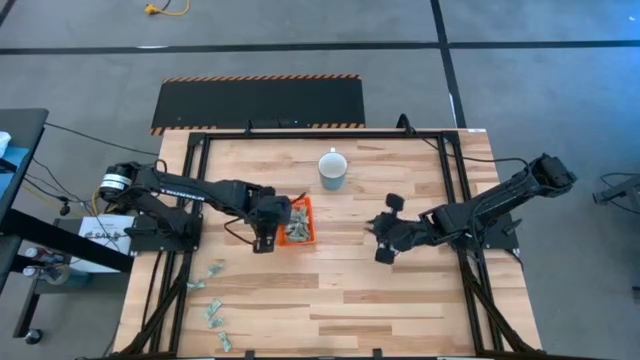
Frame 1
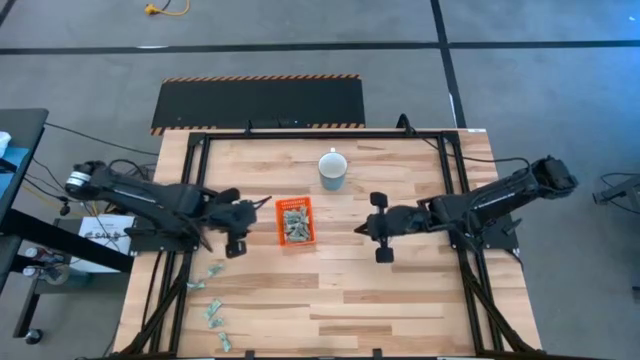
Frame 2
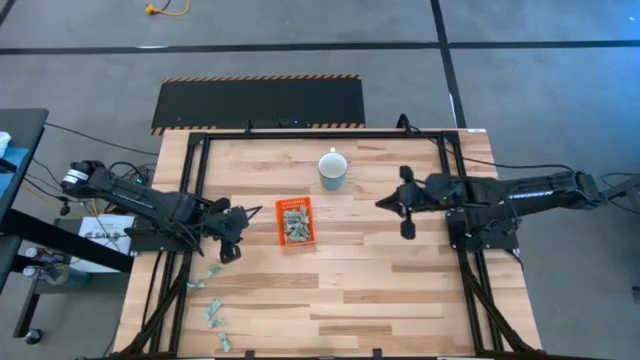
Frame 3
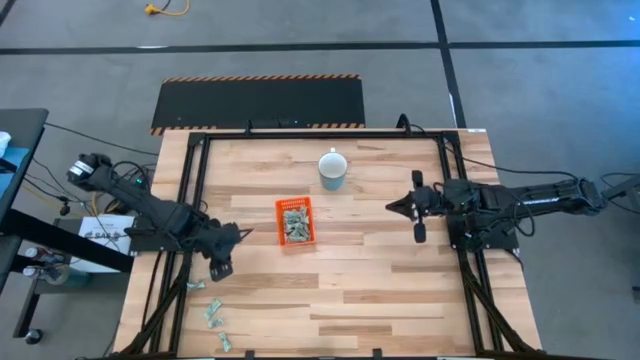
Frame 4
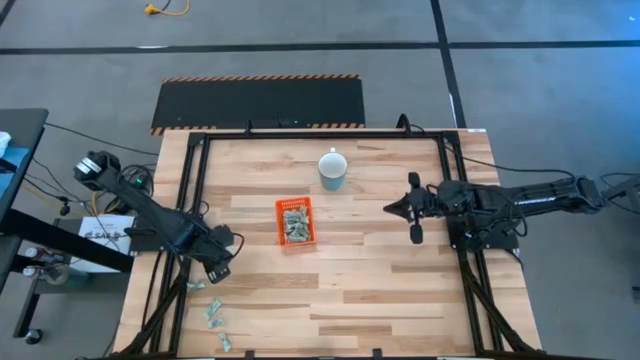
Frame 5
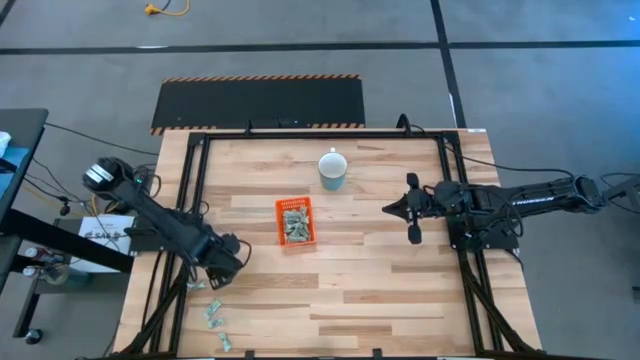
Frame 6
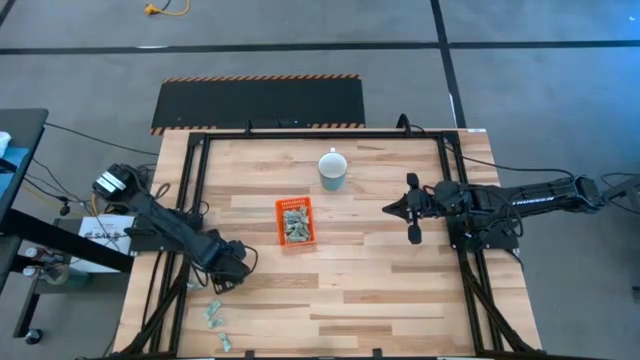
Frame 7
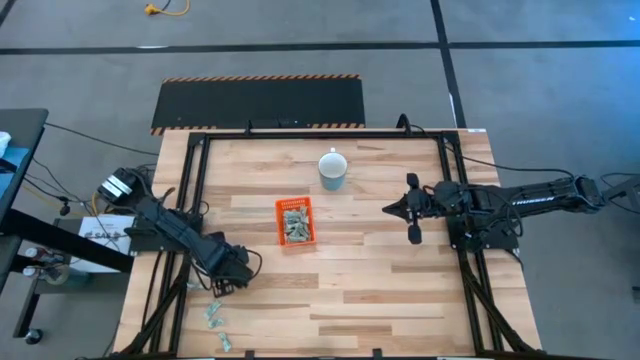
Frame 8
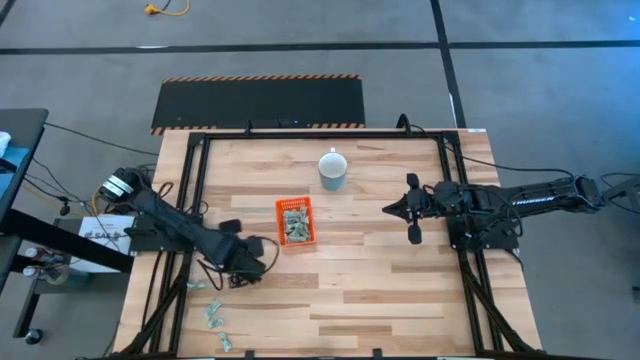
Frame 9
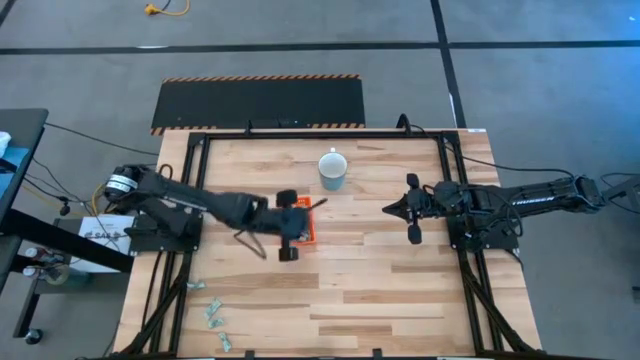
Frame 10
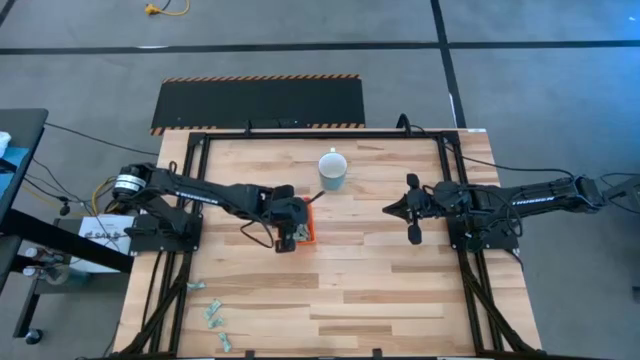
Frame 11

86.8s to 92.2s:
Task: Pick and place items into bin
Put the green stevia packet into the orange bin

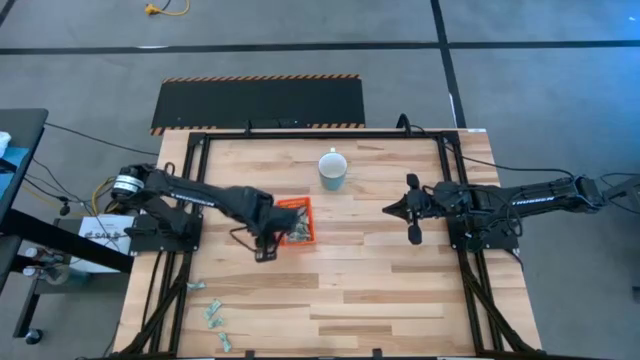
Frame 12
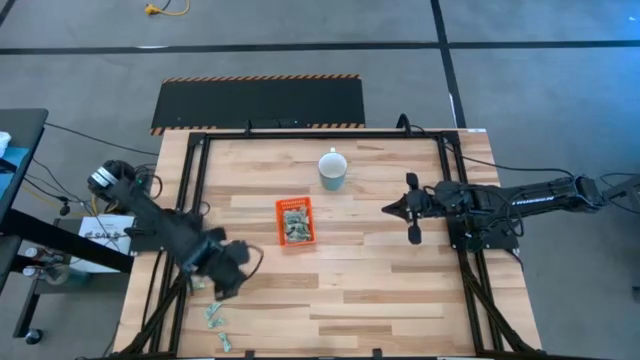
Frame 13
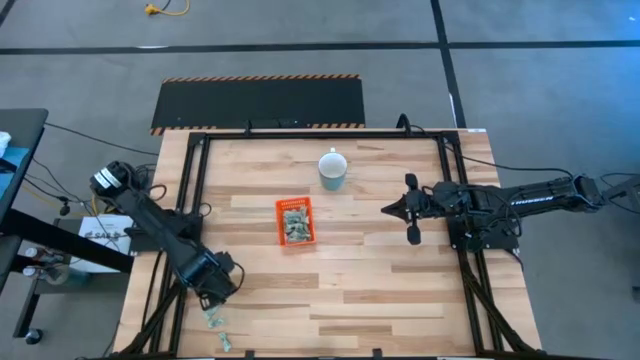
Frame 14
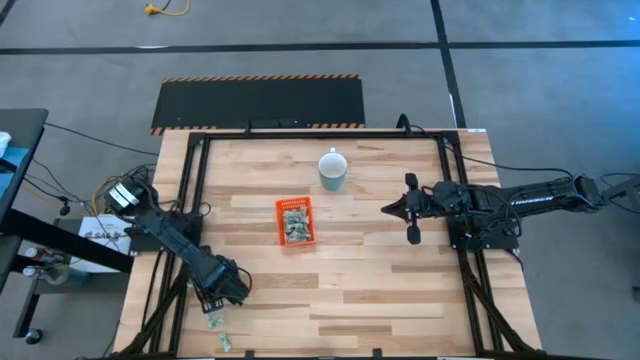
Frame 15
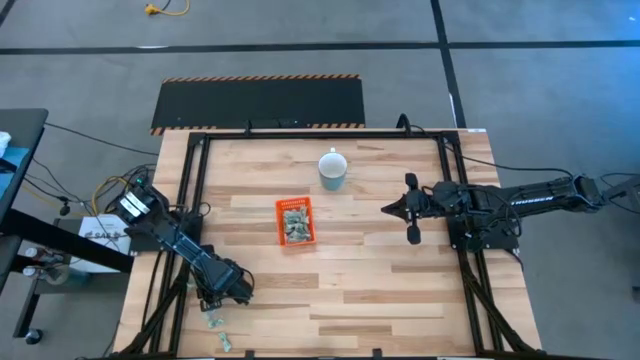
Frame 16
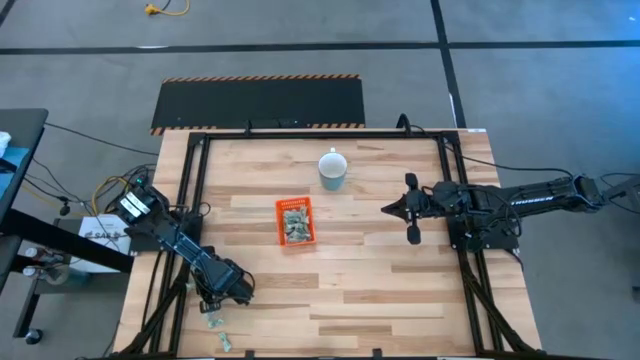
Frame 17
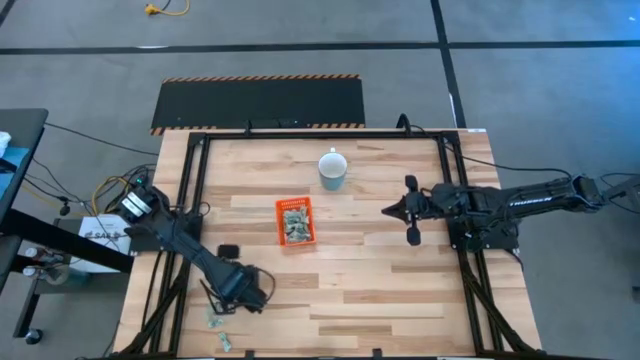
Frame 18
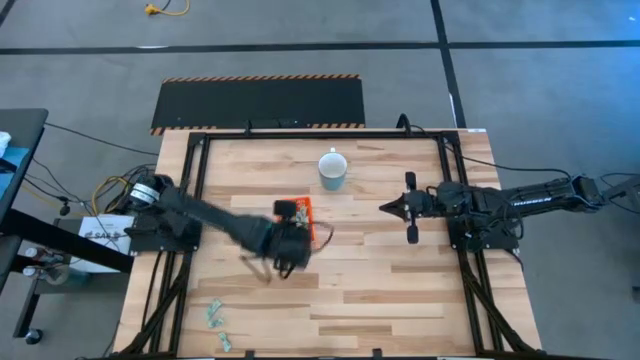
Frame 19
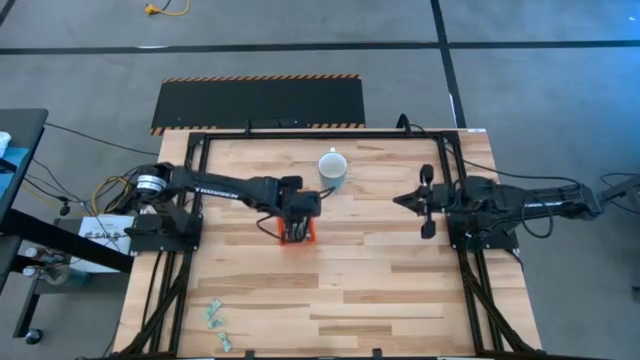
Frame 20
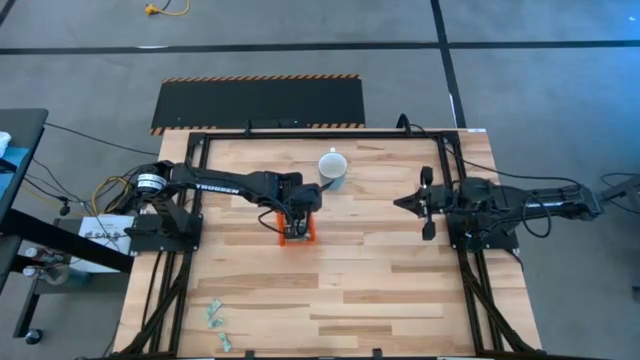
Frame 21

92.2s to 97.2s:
Put the green stevia packet into the orange bin

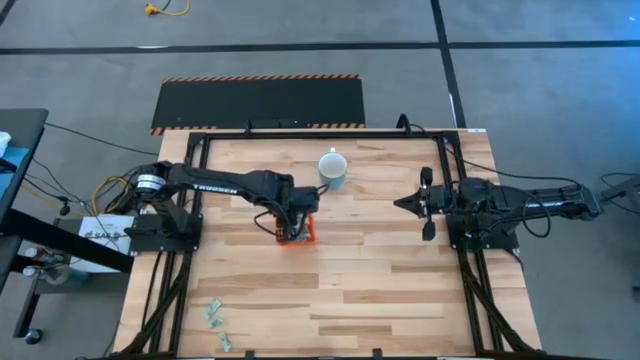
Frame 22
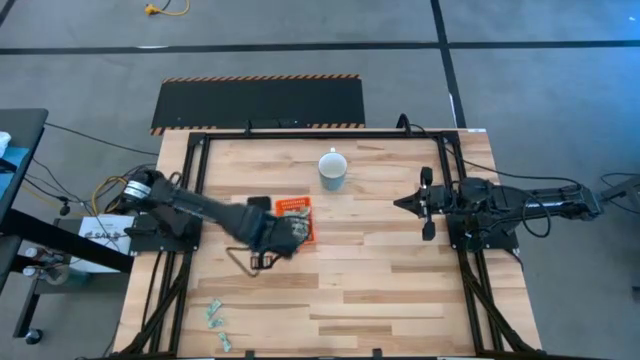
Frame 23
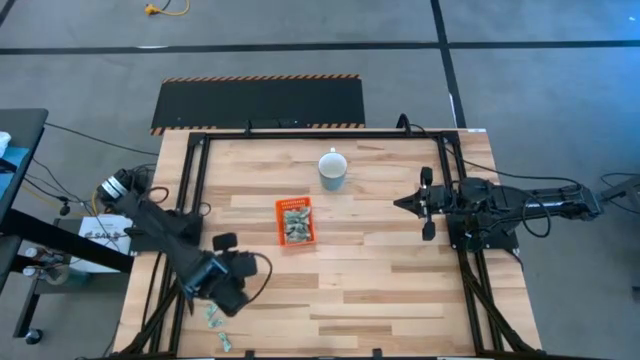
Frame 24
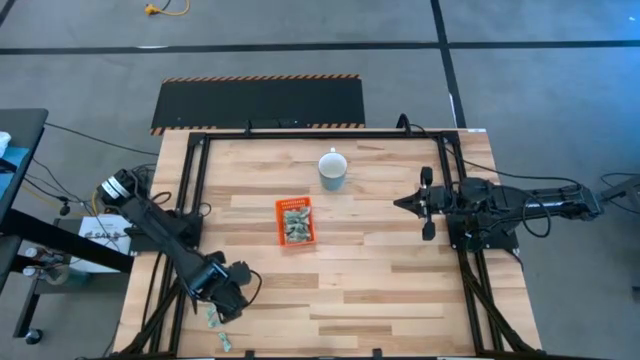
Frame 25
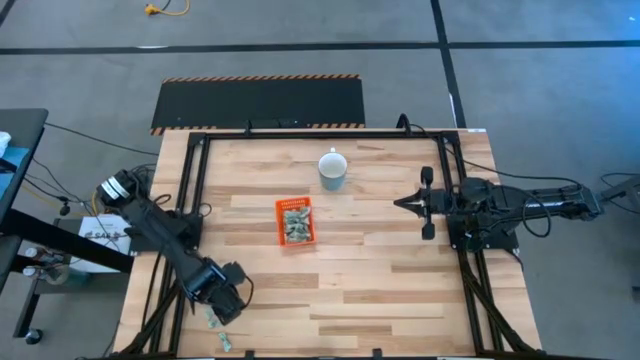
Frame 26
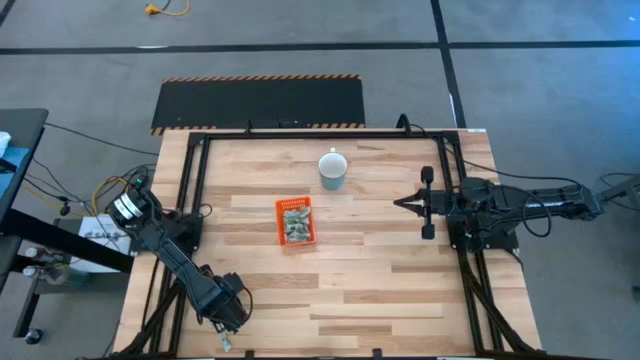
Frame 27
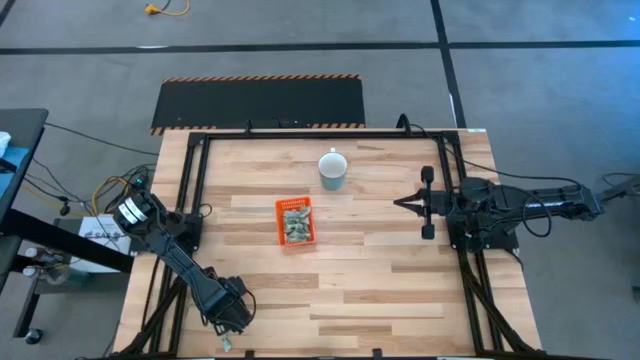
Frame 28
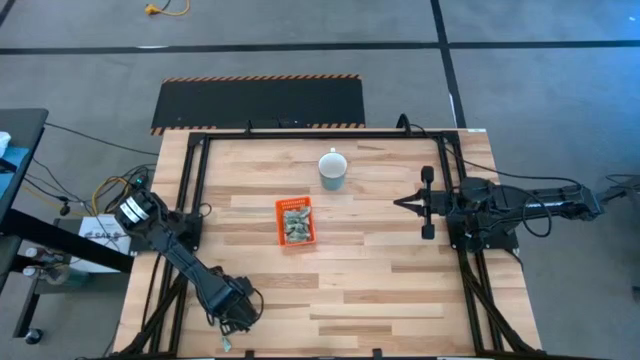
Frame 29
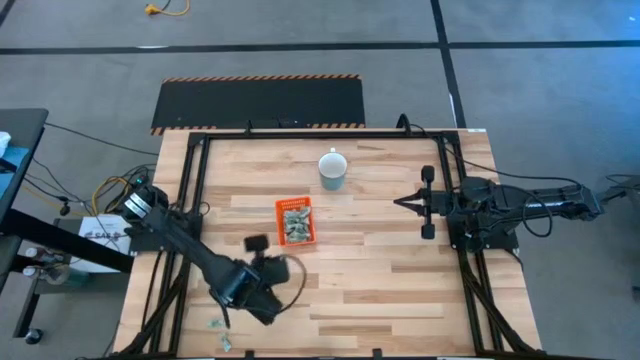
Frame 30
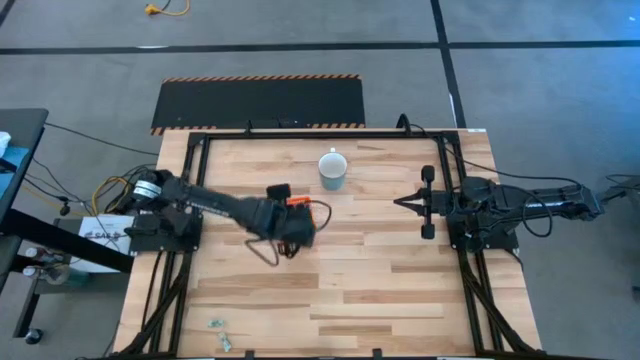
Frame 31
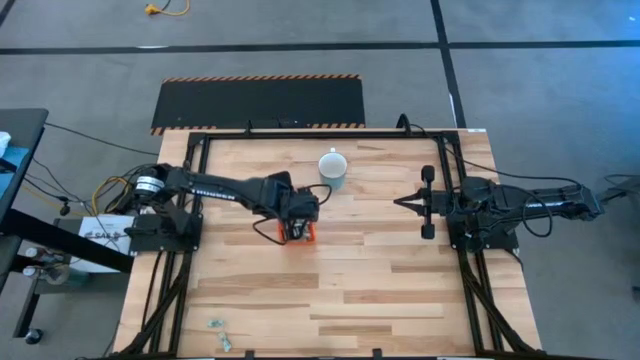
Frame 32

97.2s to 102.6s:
Put the green stevia packet into the orange bin

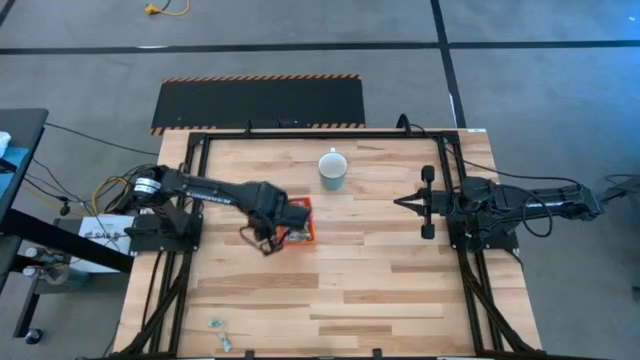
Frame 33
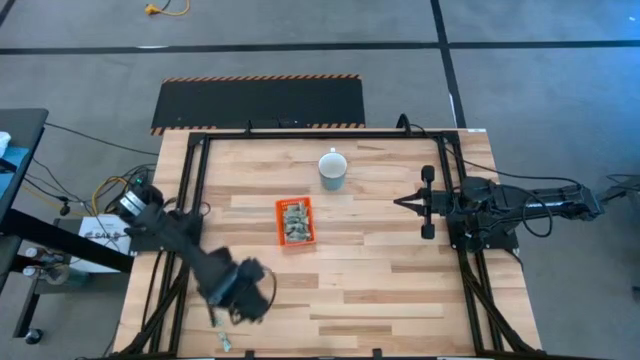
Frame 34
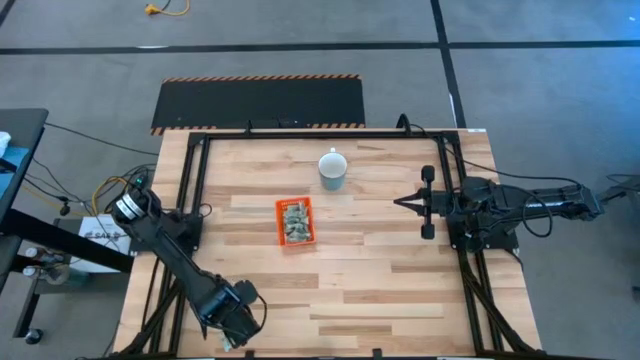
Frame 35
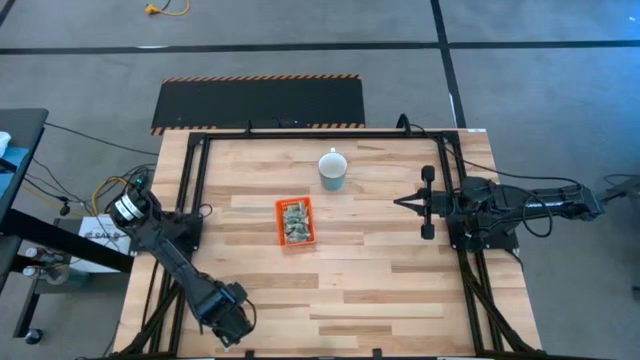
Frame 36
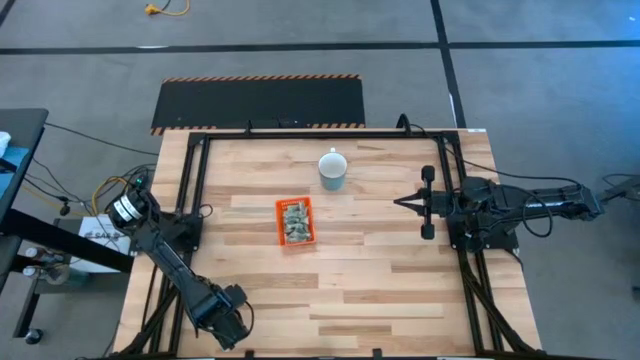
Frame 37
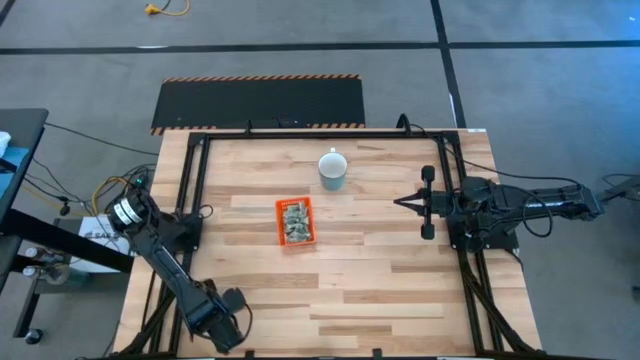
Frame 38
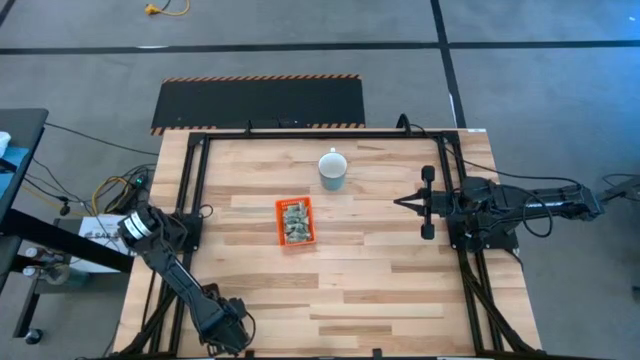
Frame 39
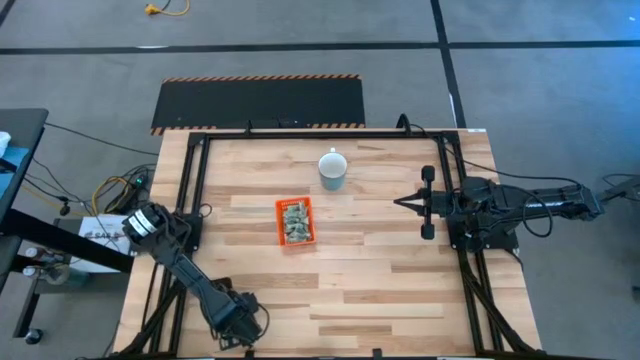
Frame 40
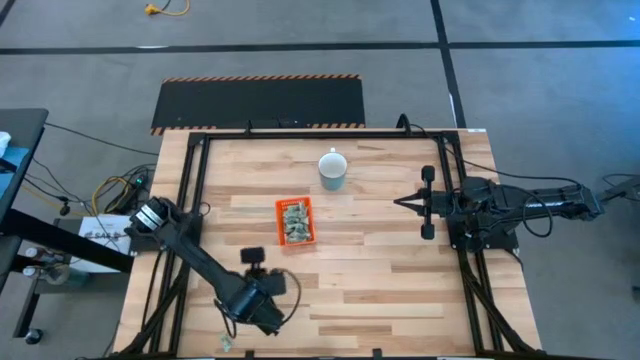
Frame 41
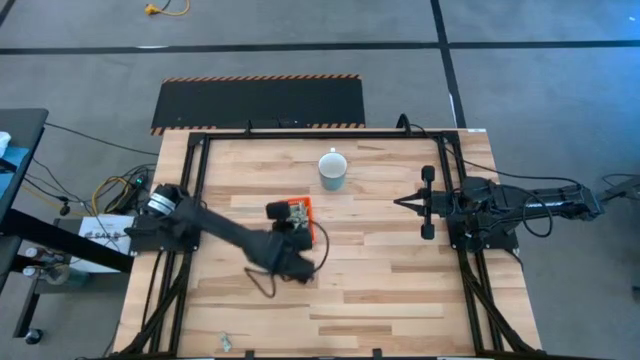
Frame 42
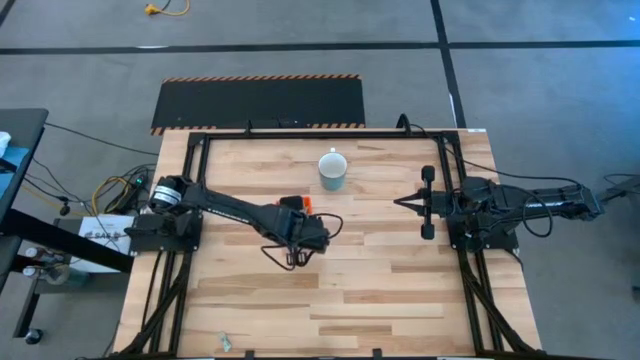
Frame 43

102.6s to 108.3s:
Put the green stevia packet into the orange bin
